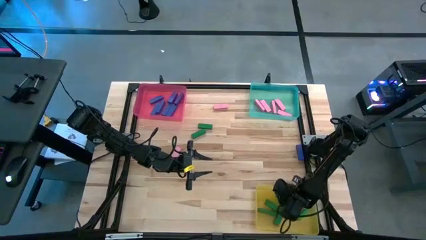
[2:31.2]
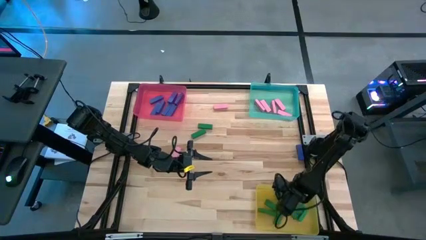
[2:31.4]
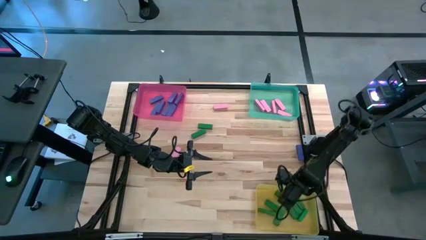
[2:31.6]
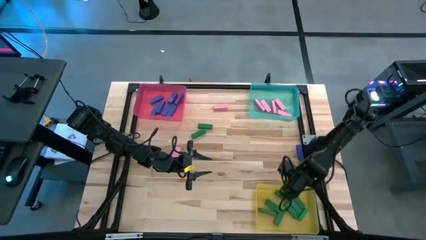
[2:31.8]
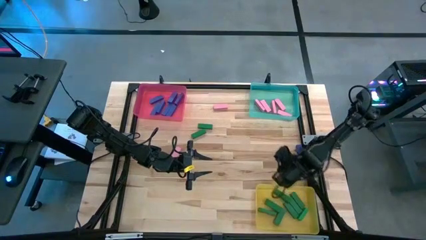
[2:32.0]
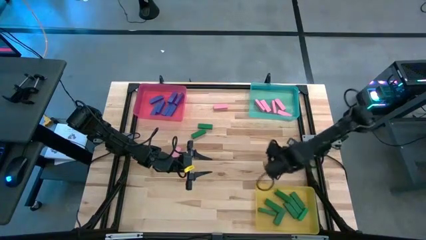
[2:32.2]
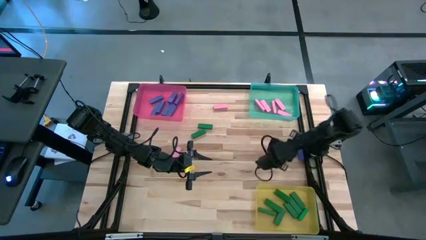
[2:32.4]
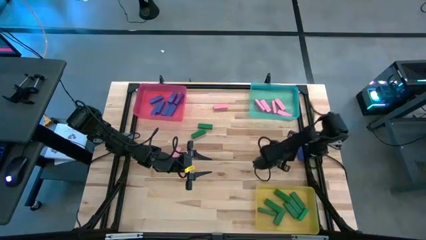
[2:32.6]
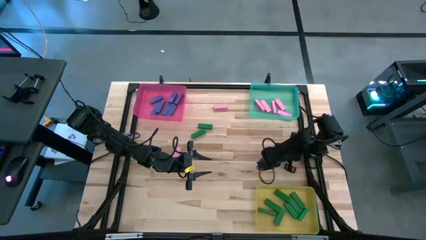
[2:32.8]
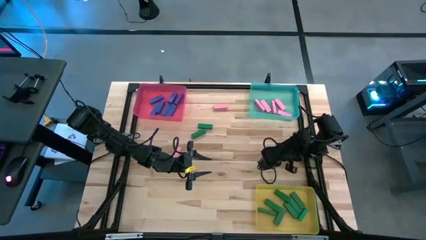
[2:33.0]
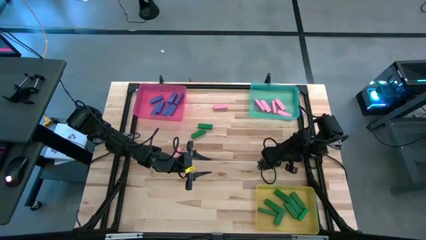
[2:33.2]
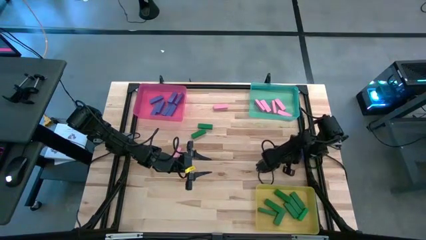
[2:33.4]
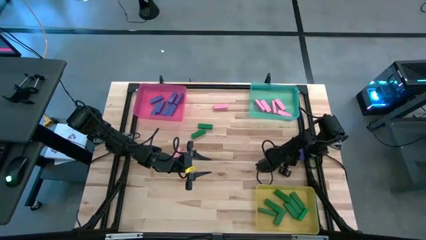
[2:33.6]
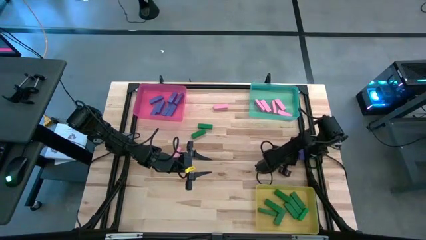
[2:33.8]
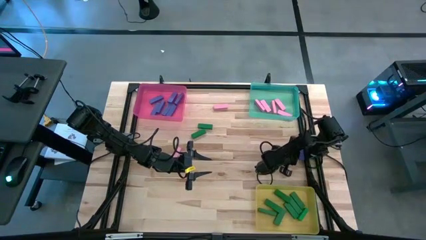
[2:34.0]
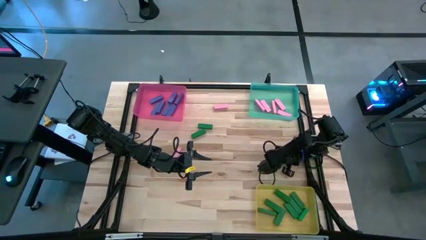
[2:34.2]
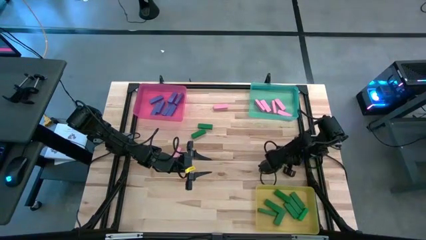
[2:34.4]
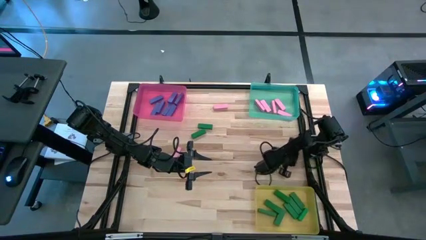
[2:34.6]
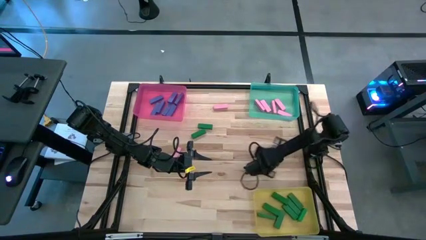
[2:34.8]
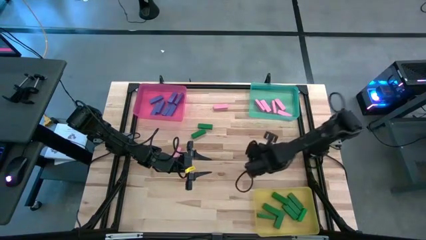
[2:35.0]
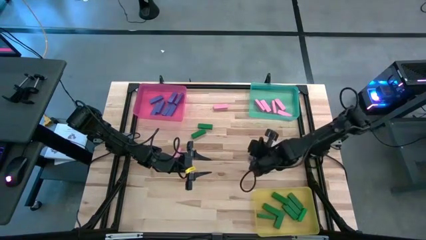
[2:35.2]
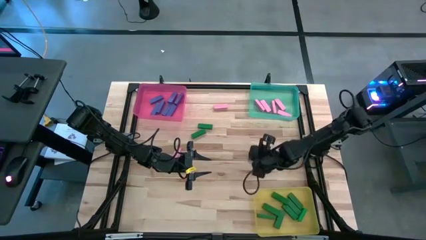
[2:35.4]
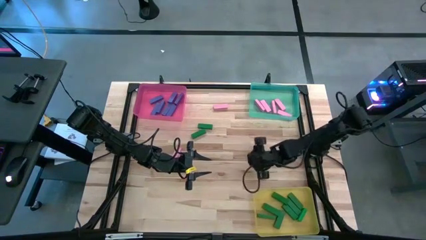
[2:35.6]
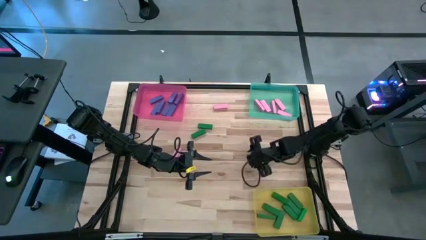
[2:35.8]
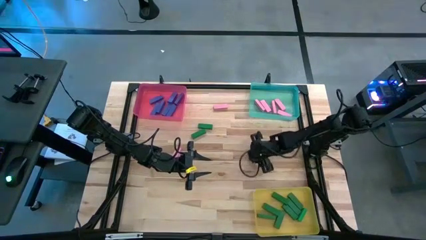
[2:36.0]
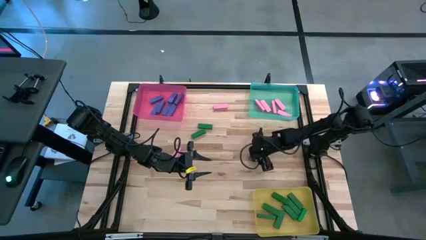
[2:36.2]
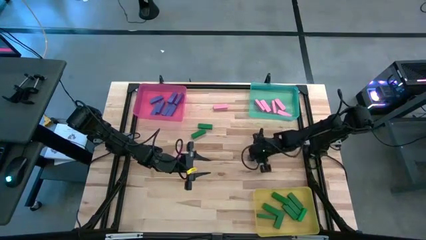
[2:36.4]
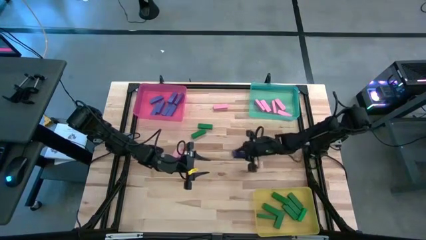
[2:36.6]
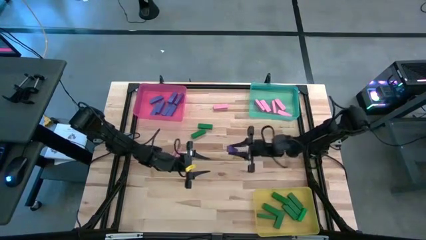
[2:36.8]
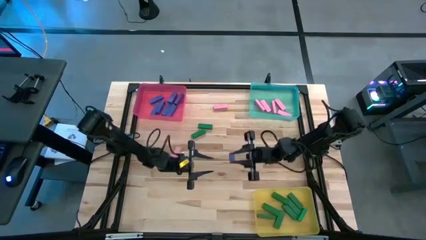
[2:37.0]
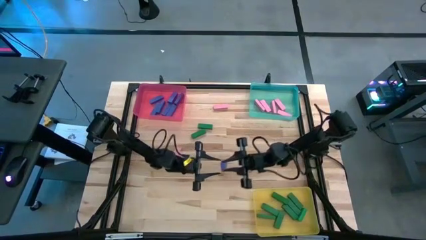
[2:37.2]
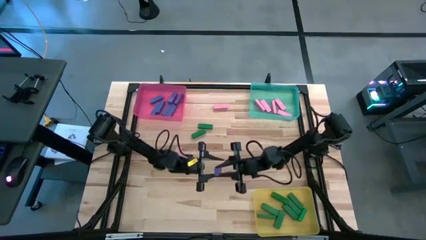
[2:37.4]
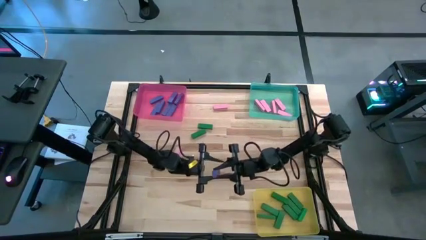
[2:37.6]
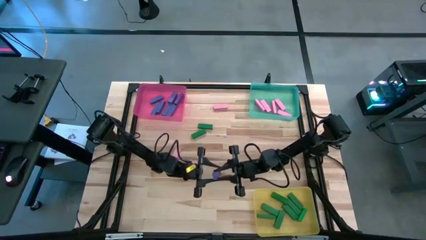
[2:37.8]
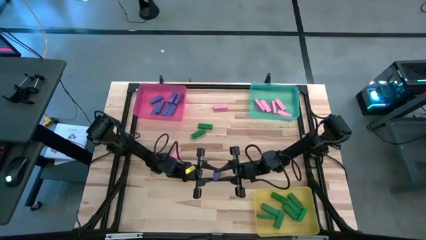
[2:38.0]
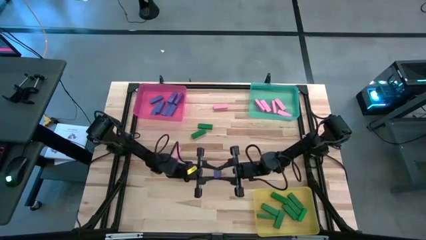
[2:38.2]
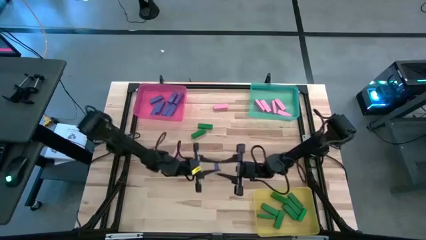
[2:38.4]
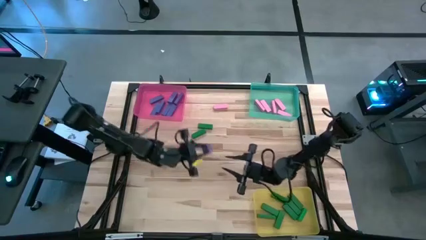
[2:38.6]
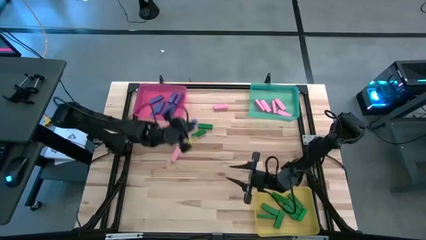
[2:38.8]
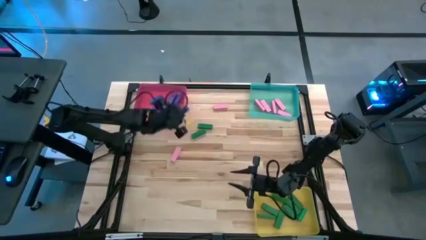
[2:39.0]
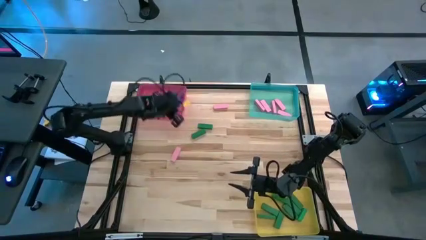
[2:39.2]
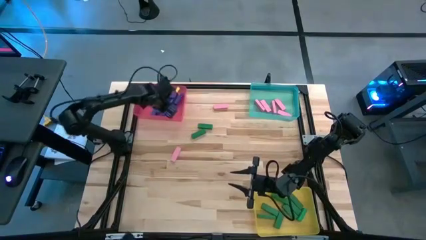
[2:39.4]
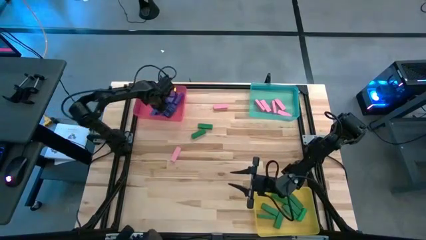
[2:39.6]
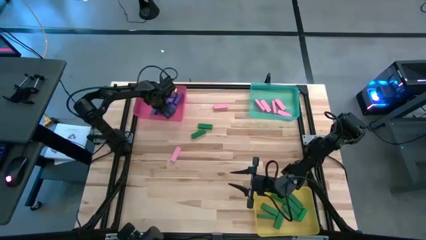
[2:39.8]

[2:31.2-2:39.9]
Task: Sort blocks
Put the blue block into the red bin

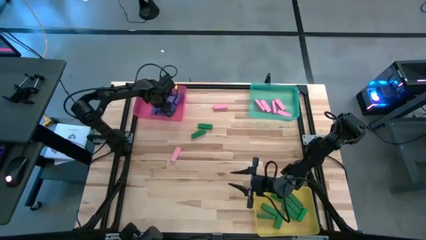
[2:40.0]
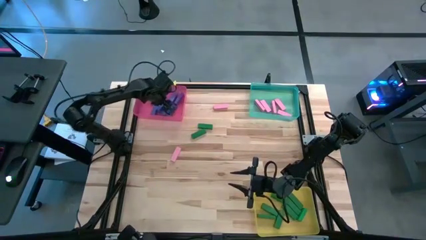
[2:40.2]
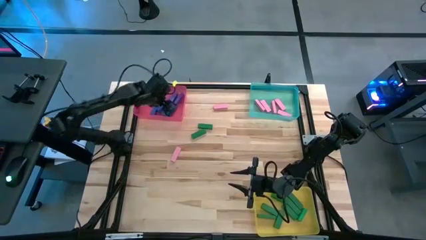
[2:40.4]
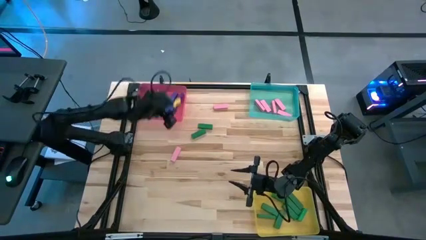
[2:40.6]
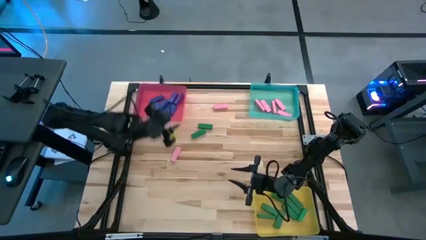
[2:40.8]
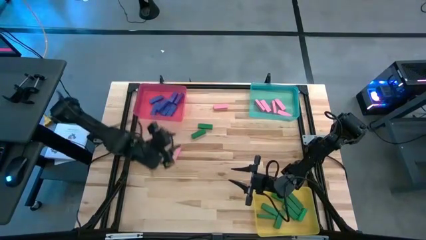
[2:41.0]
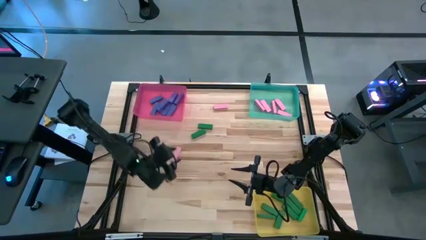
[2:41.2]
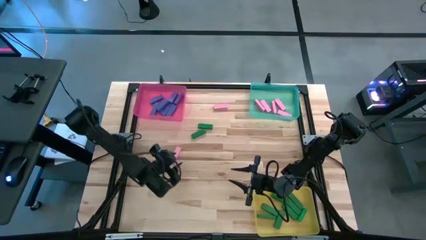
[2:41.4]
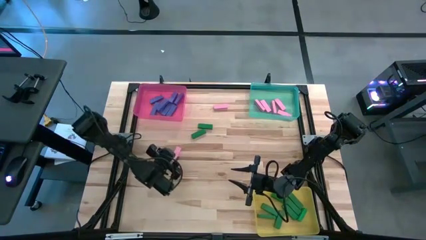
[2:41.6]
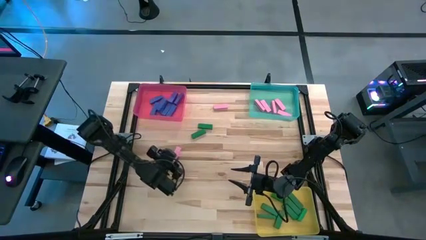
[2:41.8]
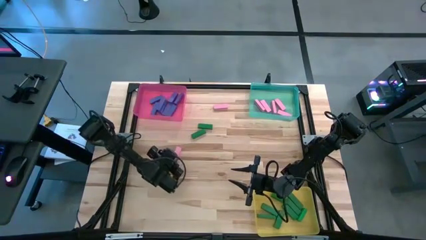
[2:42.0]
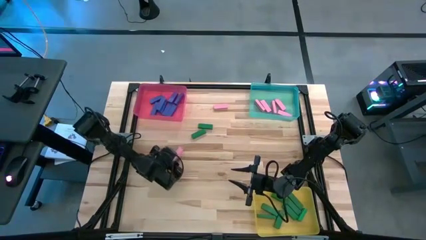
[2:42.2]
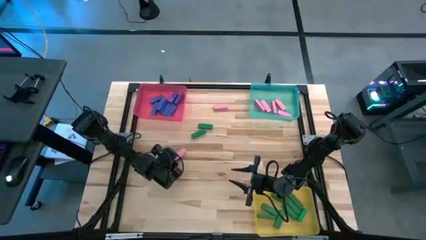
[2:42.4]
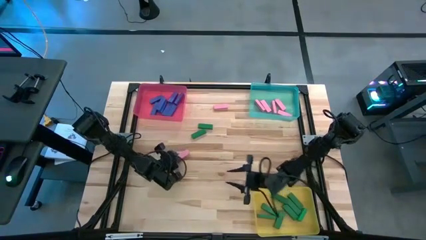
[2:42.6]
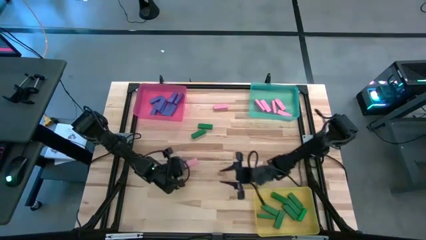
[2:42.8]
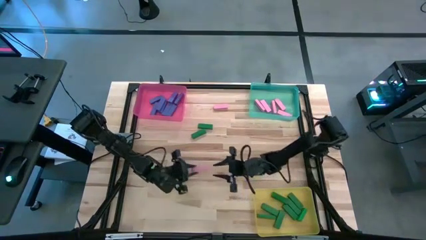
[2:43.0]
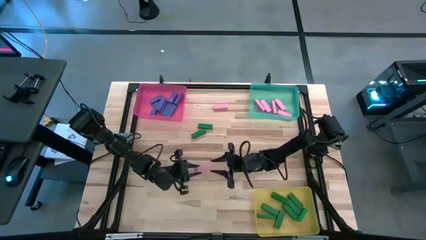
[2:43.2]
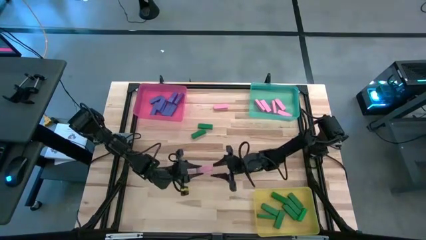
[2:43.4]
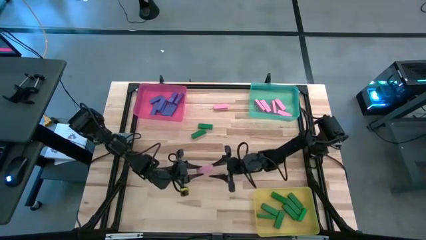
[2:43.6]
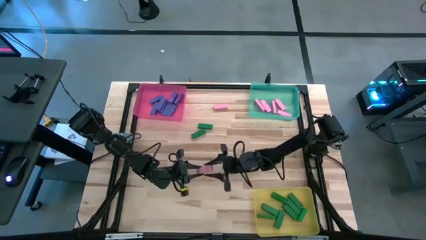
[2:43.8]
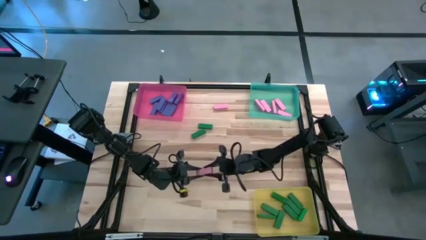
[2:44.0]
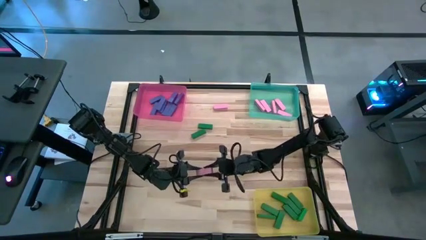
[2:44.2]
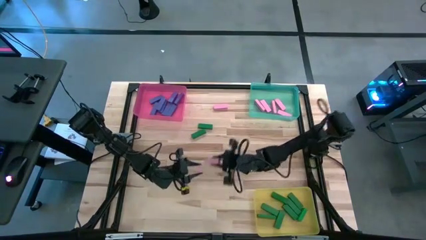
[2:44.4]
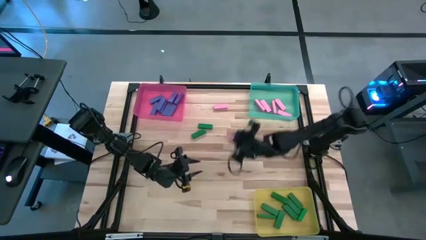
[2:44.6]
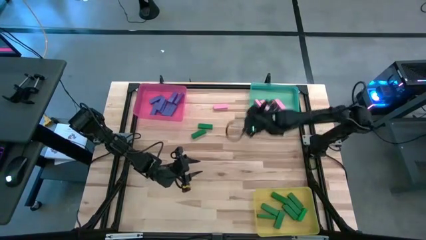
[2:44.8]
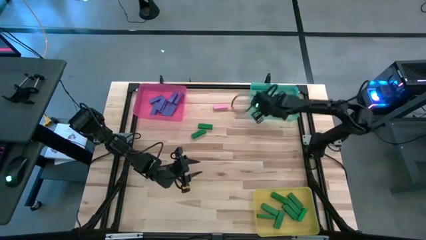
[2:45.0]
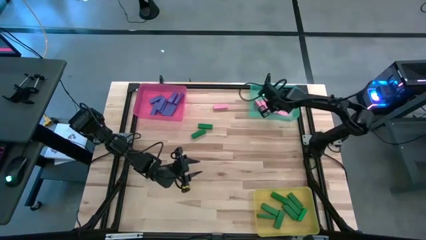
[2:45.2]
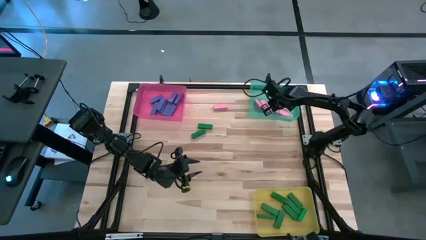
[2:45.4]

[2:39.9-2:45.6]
Put the pink block into the blue bin

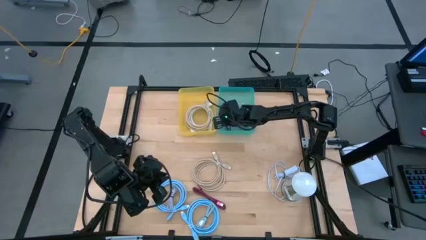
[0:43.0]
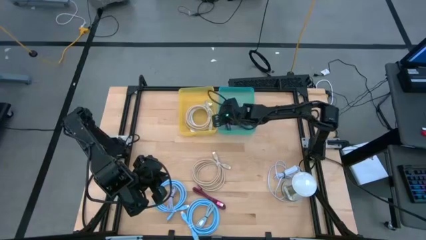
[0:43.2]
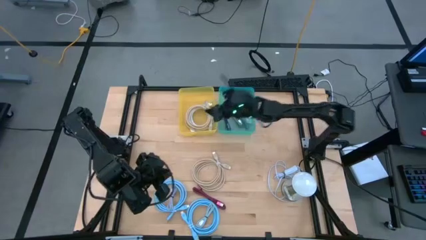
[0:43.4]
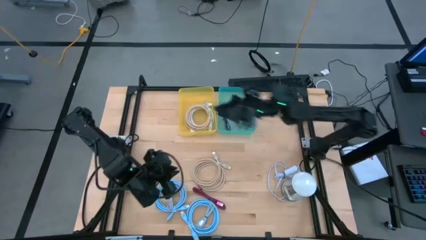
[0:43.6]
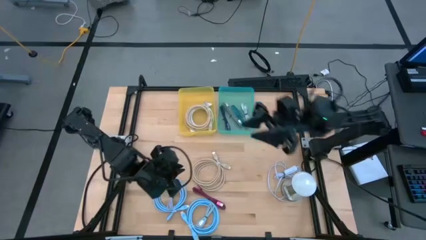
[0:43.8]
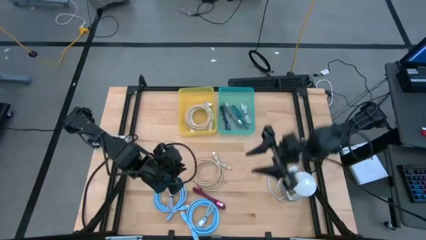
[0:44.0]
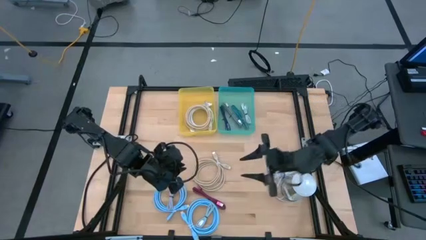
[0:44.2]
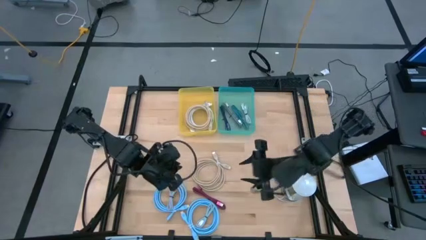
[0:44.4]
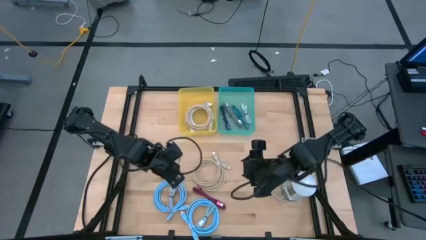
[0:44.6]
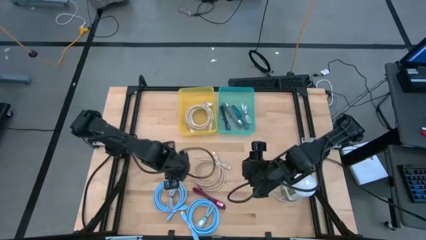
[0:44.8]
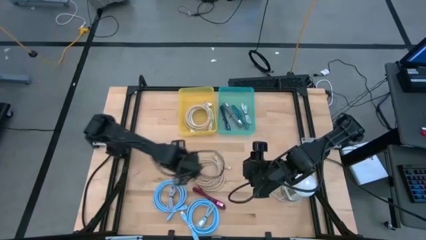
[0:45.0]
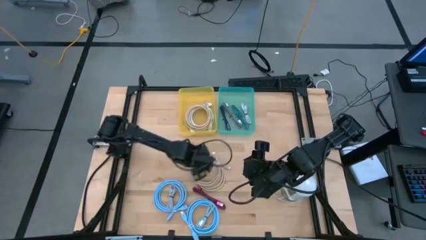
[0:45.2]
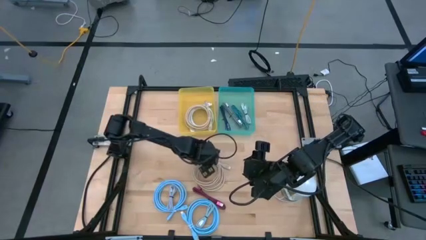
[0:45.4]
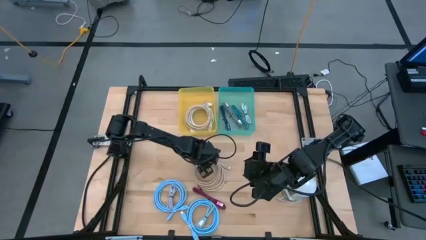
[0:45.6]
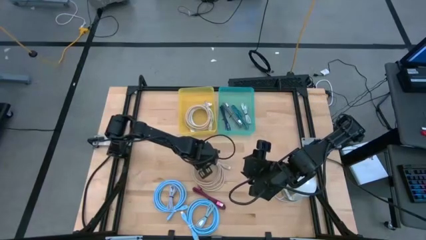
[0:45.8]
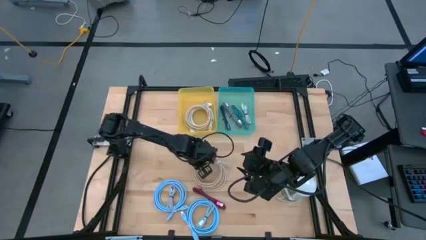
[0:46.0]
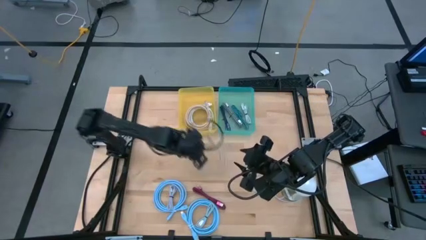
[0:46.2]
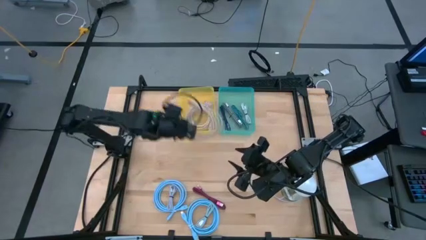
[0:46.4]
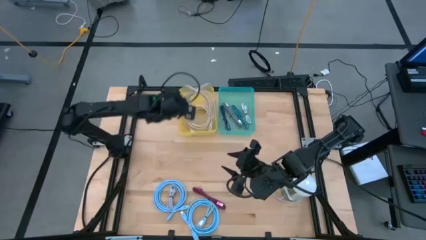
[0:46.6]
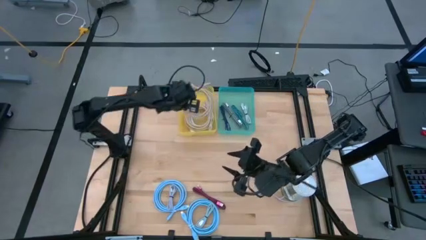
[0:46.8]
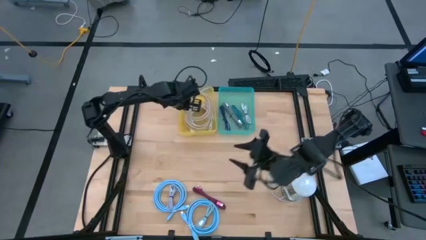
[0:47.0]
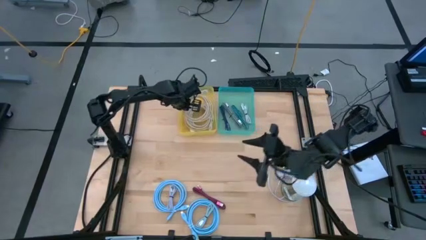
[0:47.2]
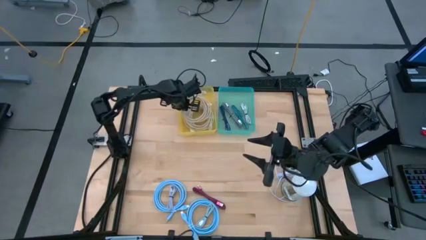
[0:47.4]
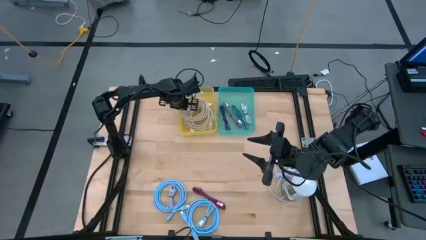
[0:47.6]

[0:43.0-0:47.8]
Task: Pick and place USB-C Cables
Put the large light brown charger cable into the yellow bin
